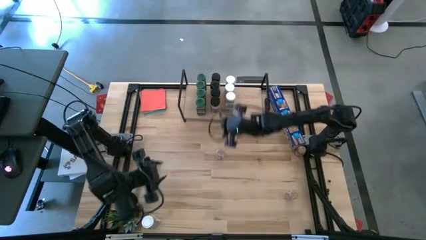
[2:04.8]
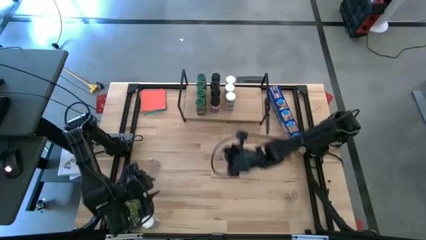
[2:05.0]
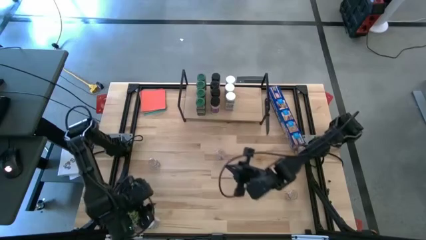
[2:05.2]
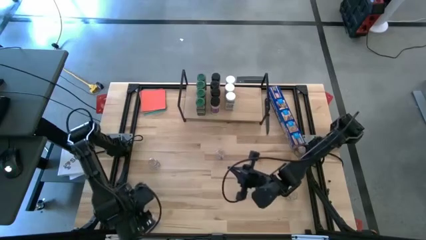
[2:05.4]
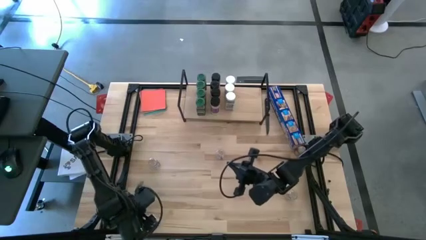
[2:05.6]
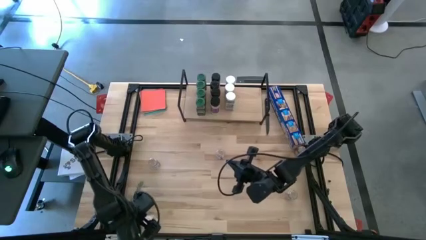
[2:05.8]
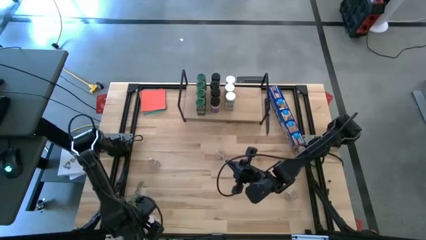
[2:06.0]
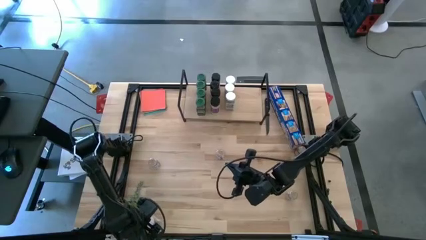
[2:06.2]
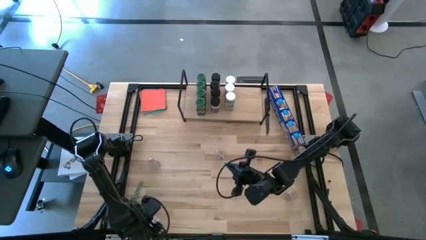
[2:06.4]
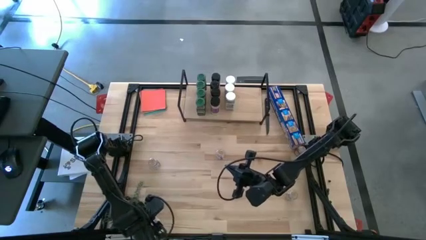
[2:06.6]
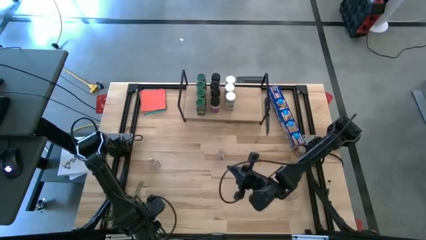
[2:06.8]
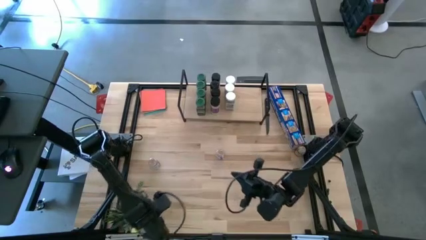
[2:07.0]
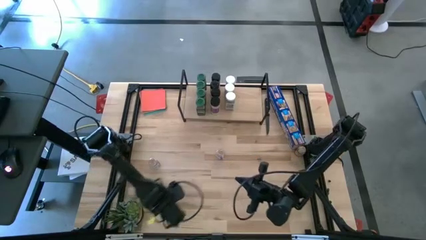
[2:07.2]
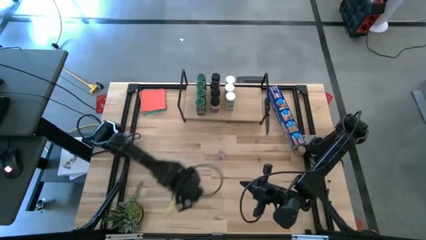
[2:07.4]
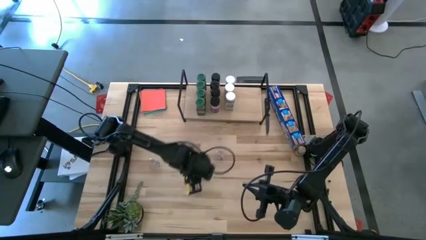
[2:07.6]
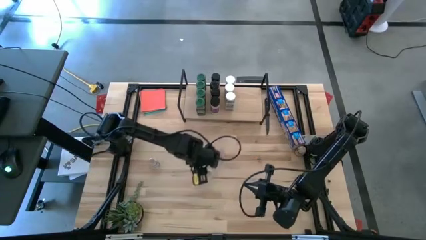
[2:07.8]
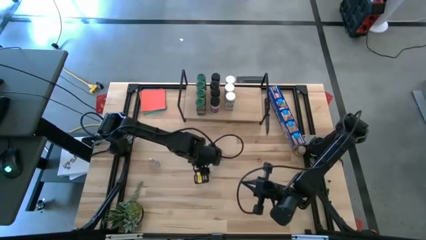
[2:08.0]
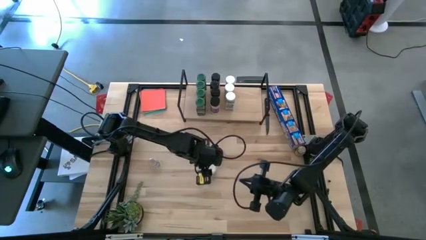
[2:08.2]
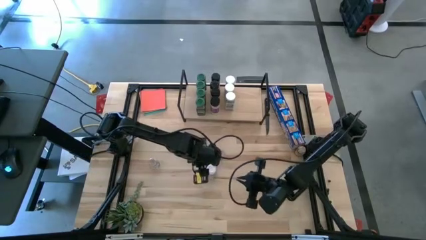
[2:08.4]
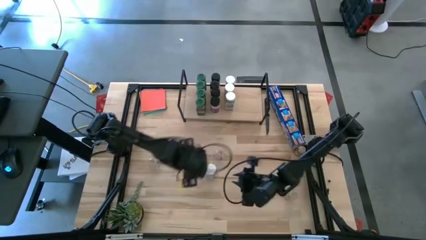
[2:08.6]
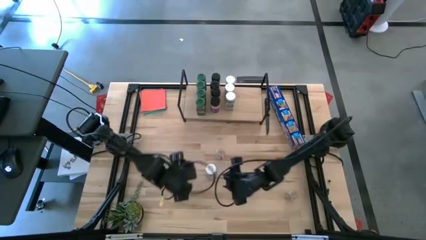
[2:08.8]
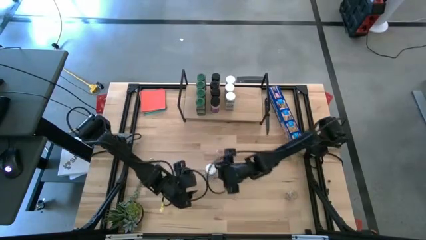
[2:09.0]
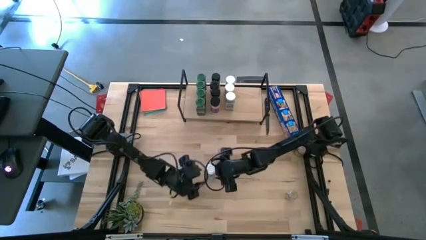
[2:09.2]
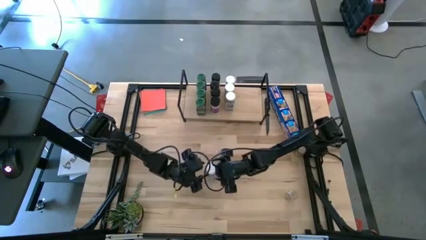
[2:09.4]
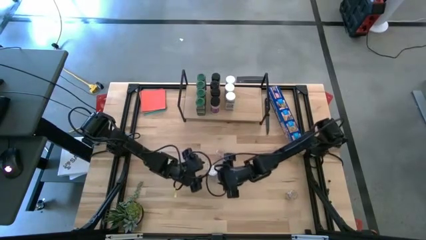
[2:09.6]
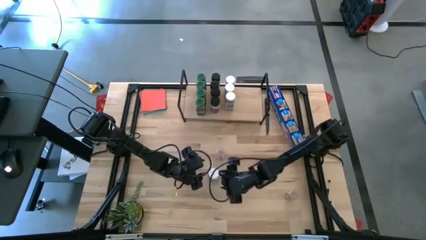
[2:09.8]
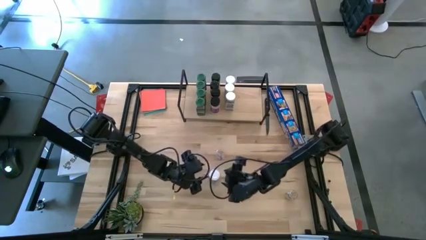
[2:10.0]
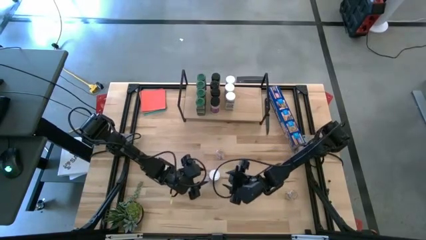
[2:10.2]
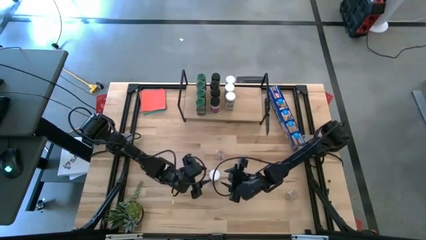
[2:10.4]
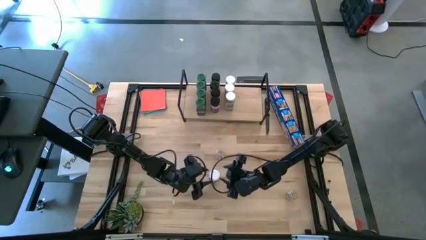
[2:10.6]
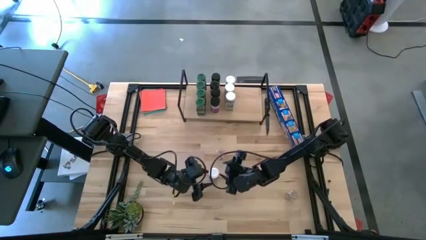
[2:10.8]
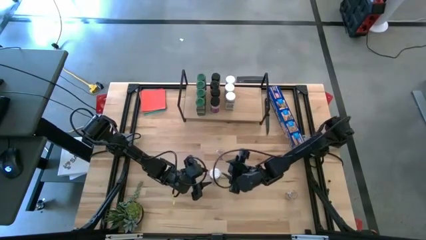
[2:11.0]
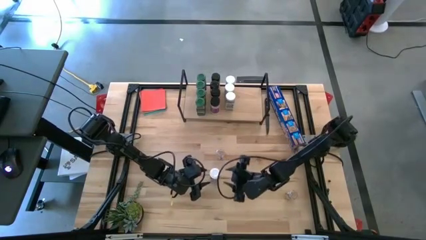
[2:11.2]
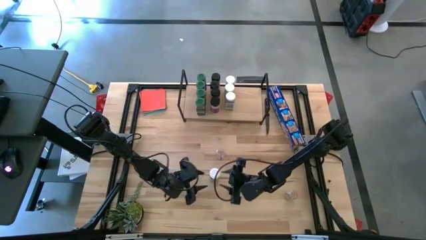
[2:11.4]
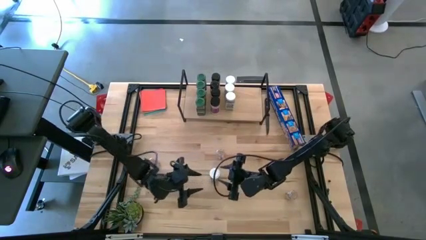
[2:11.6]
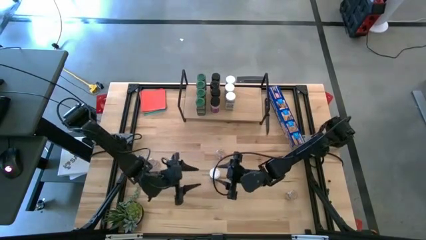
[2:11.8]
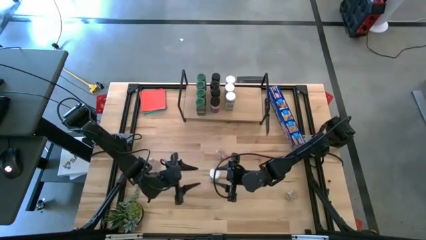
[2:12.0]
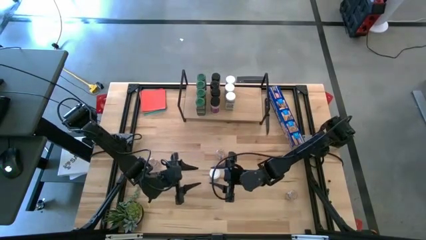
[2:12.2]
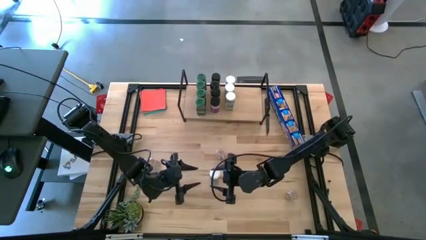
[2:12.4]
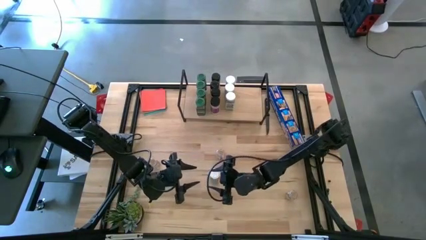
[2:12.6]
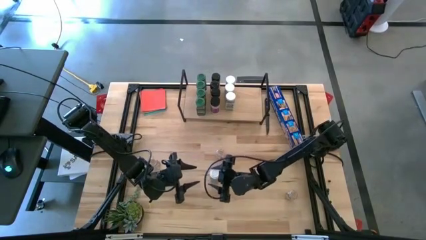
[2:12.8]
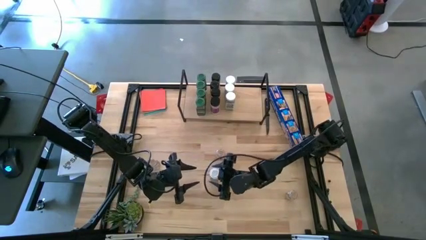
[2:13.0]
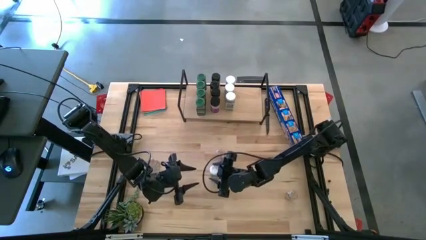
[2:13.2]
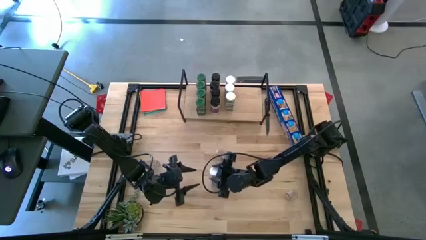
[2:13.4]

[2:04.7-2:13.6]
Task: Shelf spices
Put the white seasoning bottle on the shelf aligned with the other white seasoning bottles

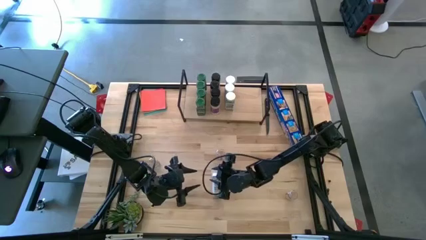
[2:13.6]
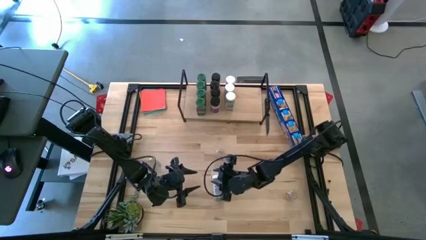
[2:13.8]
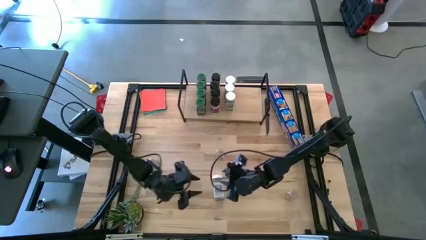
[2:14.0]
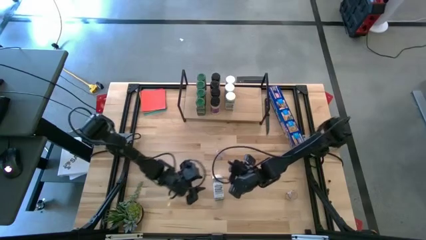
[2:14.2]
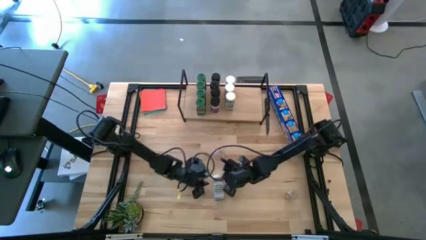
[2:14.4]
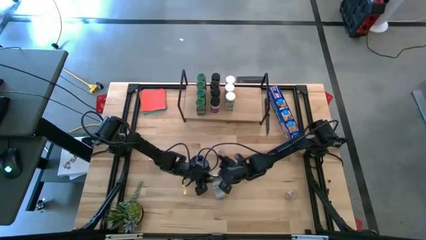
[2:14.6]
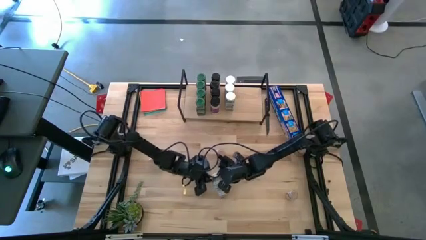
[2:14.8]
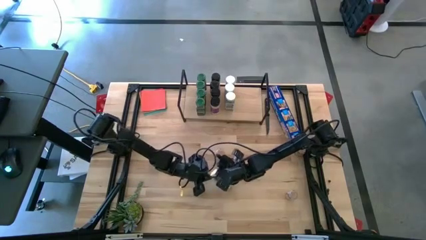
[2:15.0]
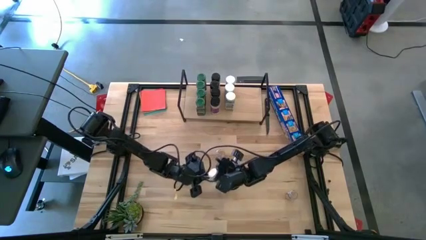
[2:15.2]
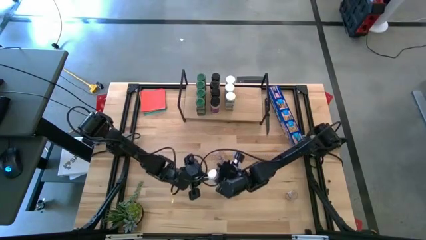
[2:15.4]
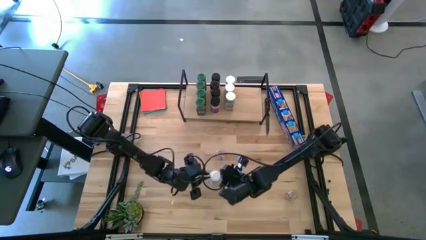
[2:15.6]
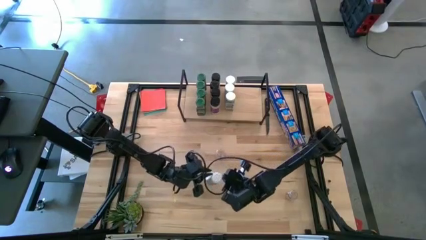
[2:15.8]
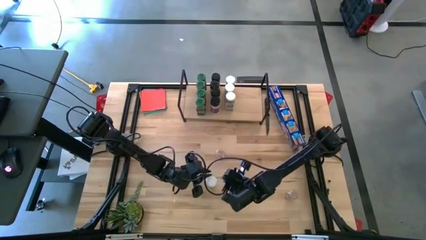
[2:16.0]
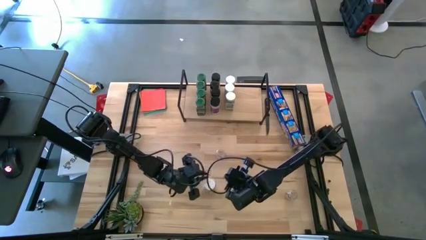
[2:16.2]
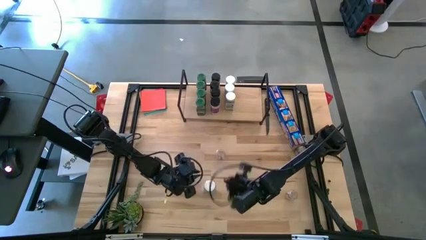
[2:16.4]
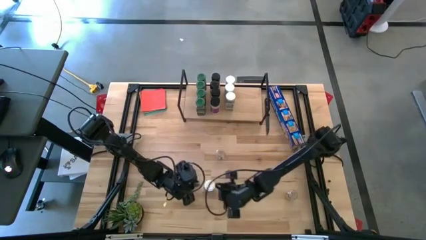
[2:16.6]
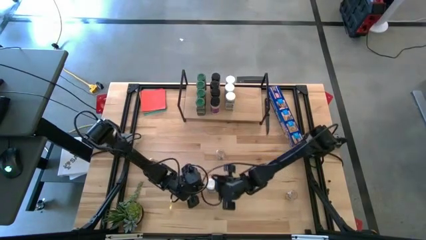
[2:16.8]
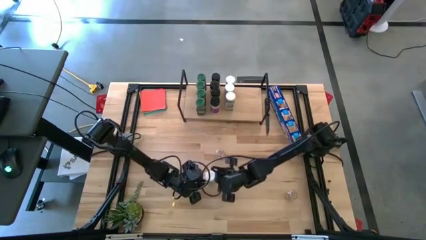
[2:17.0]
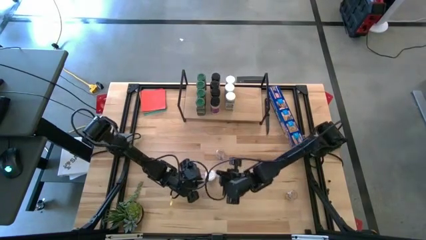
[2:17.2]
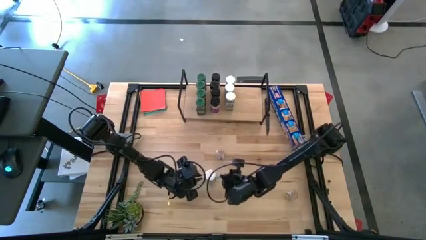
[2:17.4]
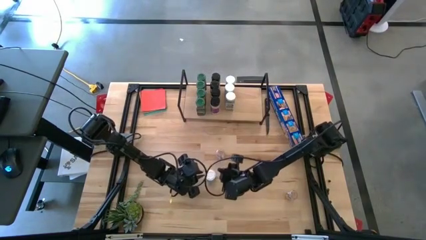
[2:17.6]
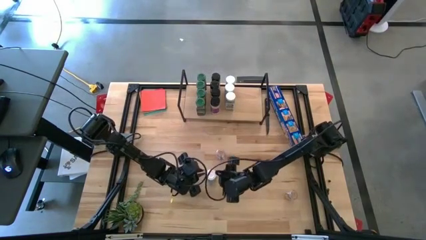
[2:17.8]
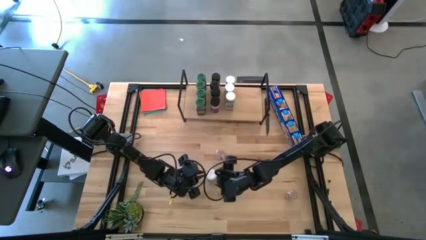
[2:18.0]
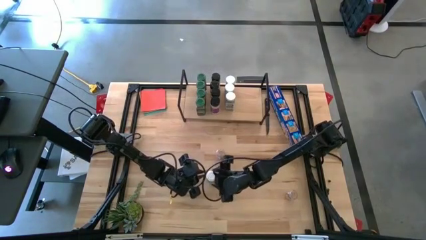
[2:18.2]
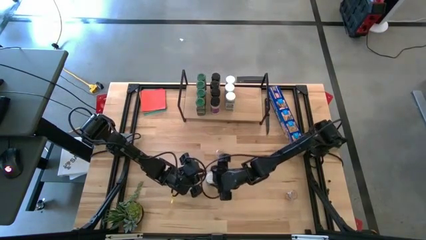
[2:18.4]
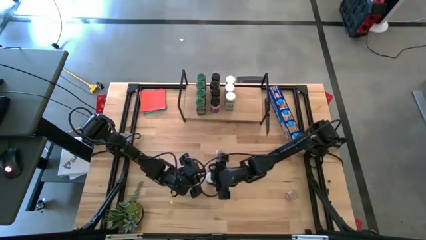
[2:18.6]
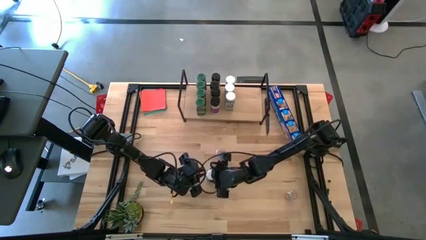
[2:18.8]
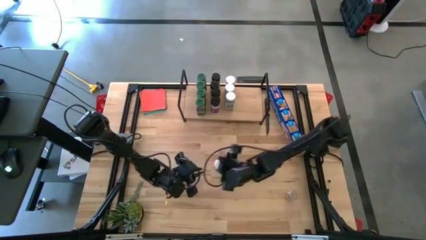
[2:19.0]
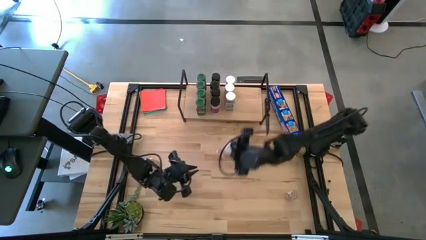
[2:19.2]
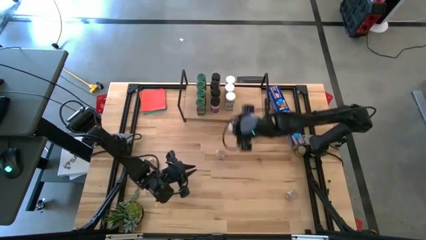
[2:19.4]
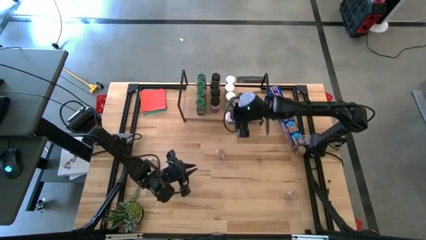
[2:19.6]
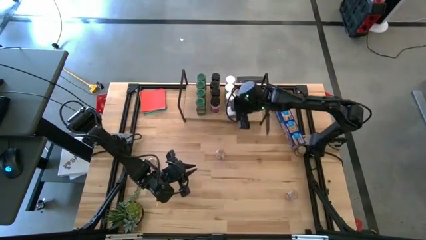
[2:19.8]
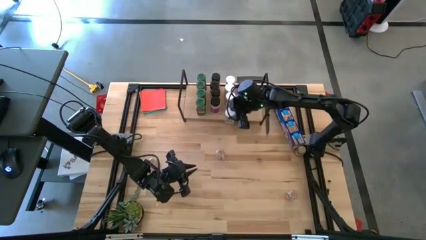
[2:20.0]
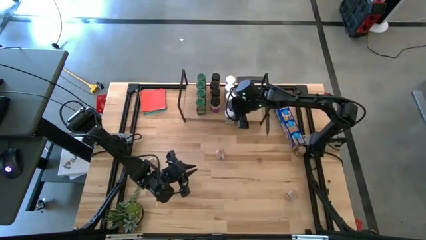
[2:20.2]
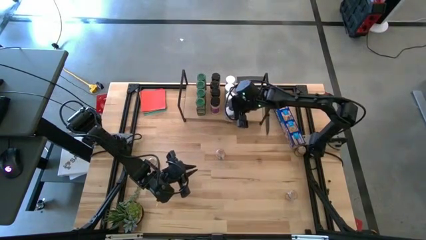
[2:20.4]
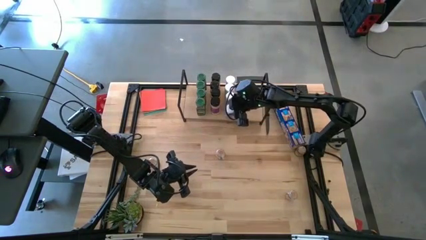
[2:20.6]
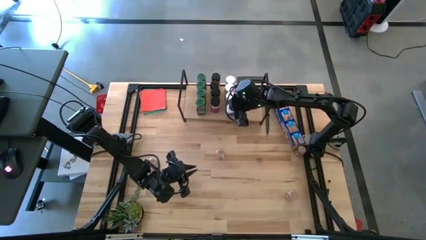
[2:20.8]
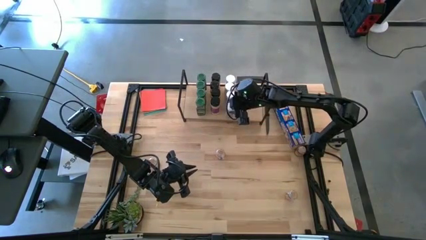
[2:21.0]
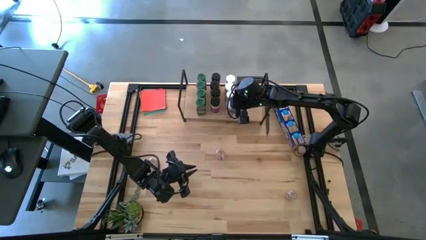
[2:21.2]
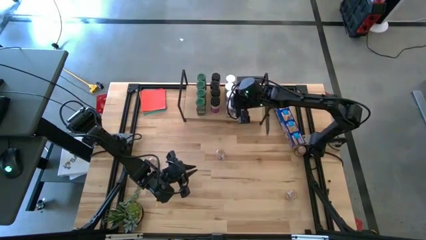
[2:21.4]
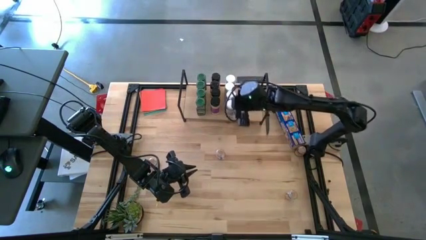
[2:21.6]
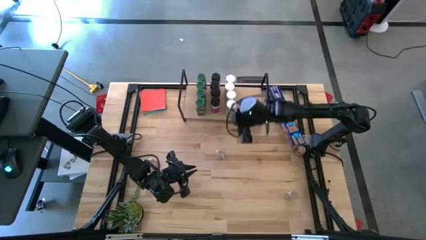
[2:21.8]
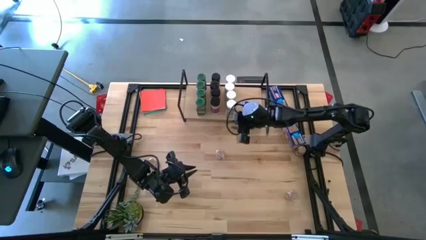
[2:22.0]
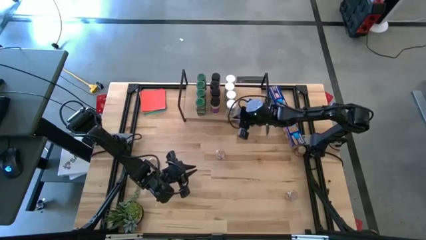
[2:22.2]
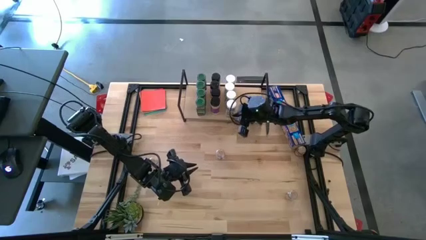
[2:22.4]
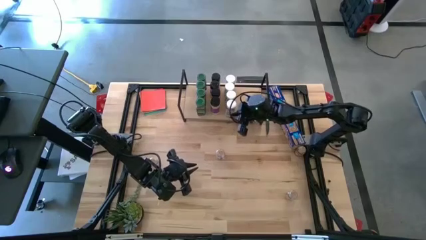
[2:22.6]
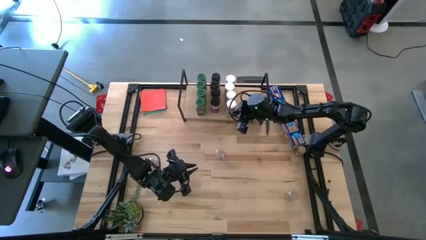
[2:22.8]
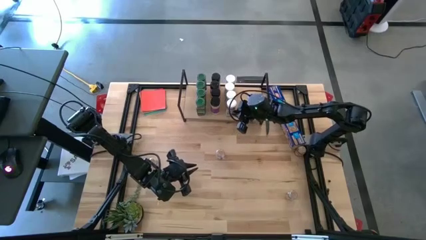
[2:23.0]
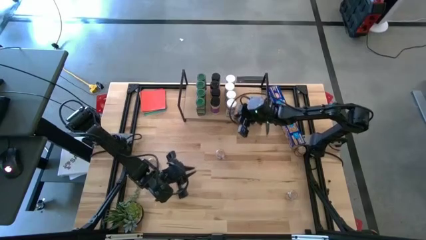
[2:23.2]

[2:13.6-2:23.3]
Put the white seasoning bottle on the shelf aligned with the other white seasoning bottles
